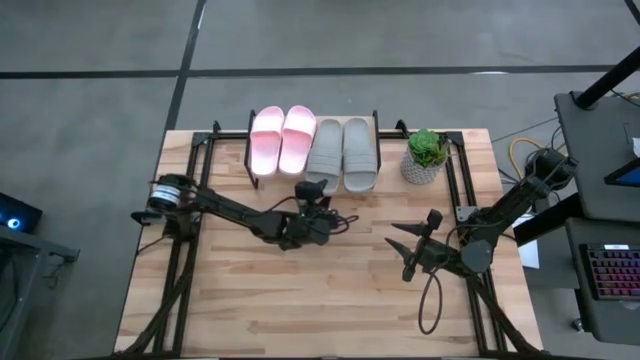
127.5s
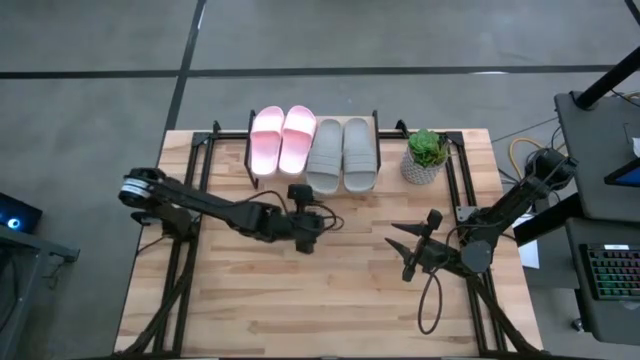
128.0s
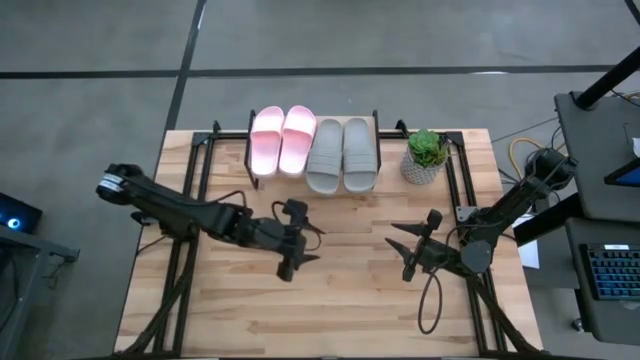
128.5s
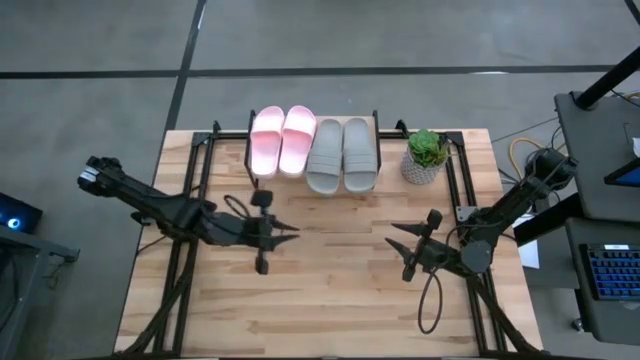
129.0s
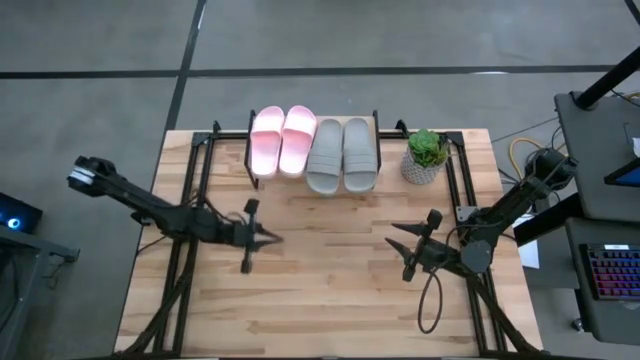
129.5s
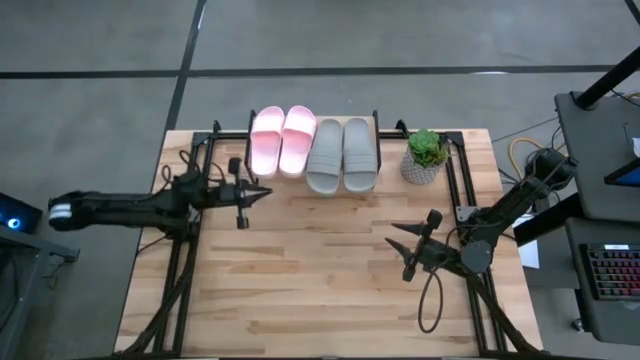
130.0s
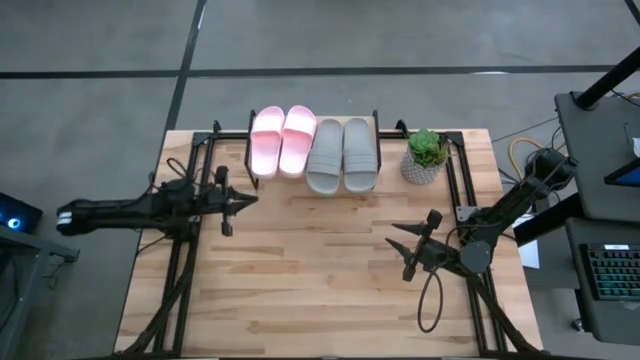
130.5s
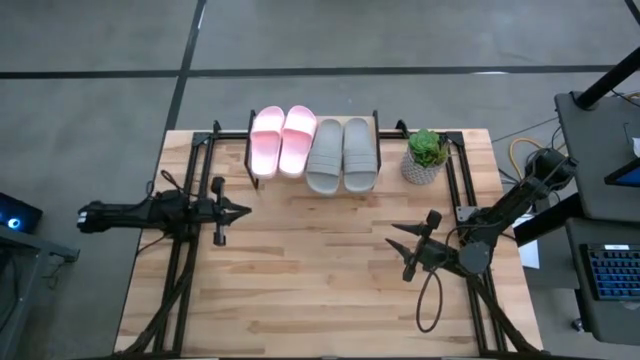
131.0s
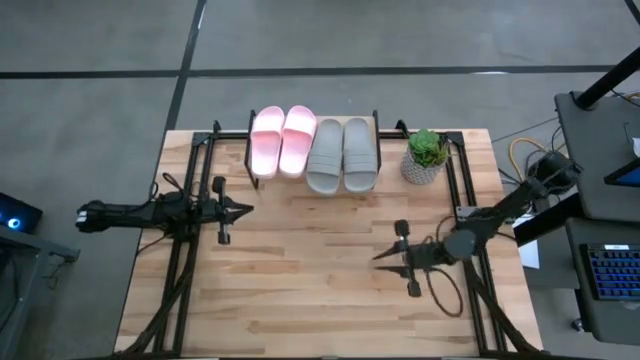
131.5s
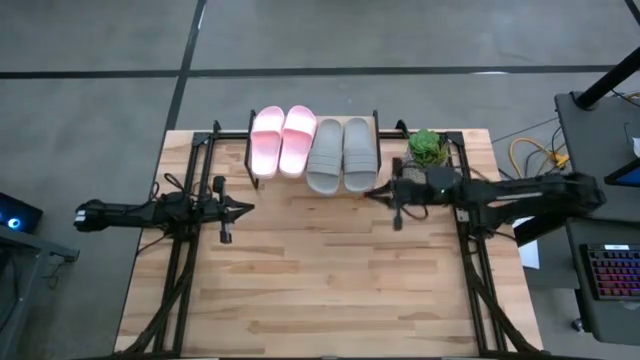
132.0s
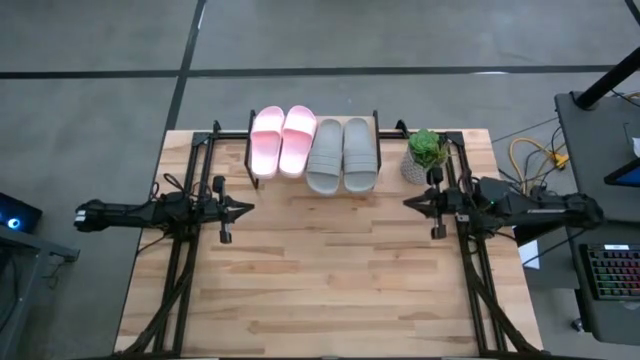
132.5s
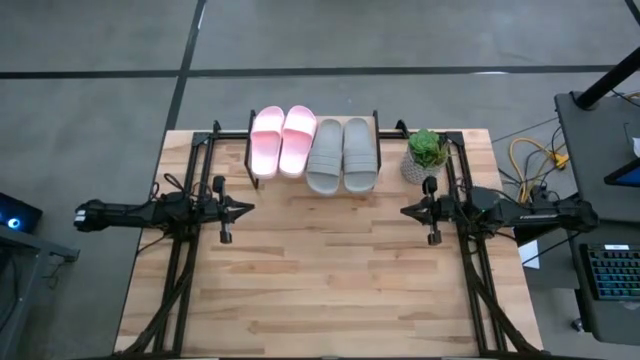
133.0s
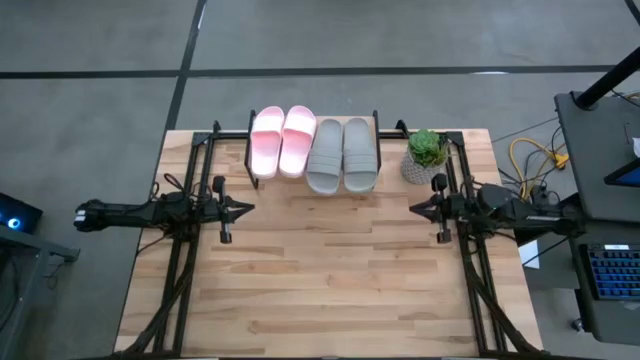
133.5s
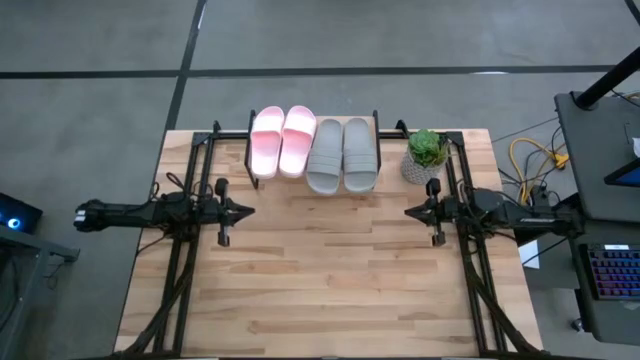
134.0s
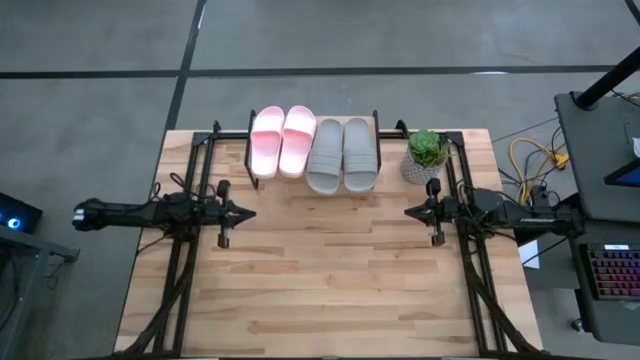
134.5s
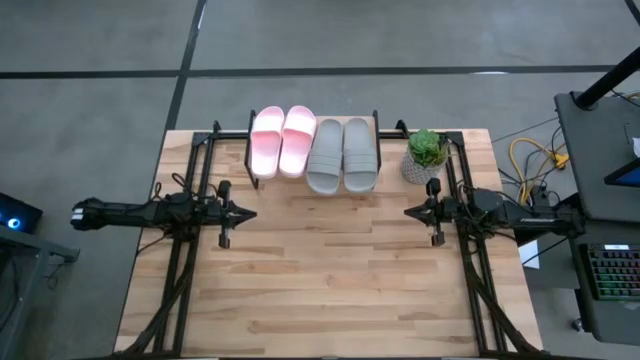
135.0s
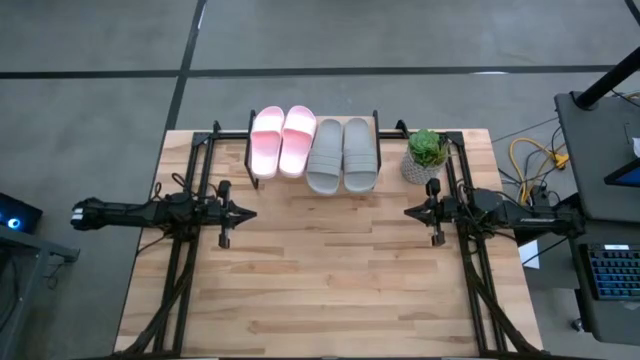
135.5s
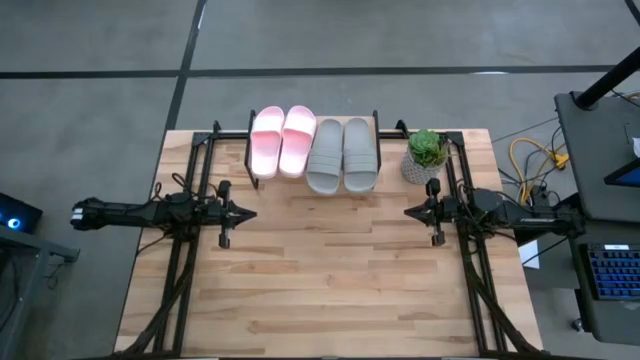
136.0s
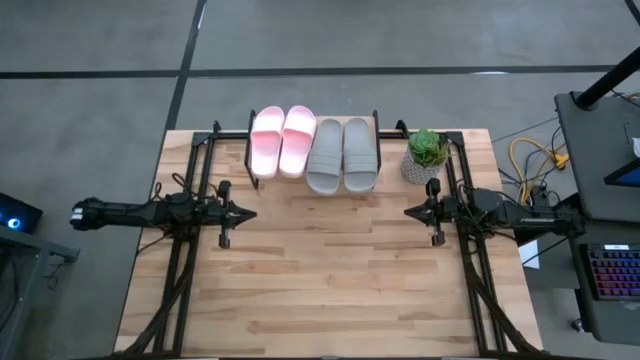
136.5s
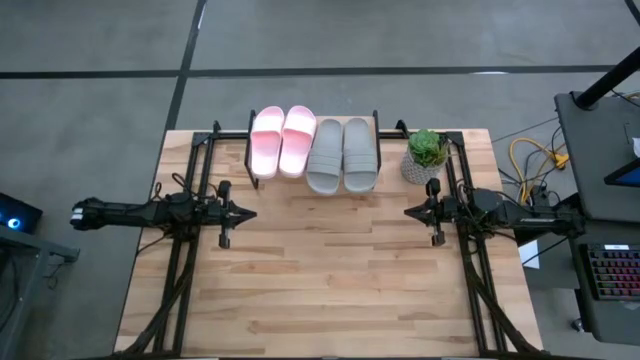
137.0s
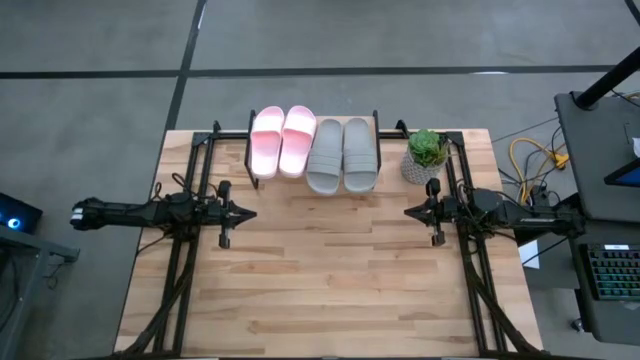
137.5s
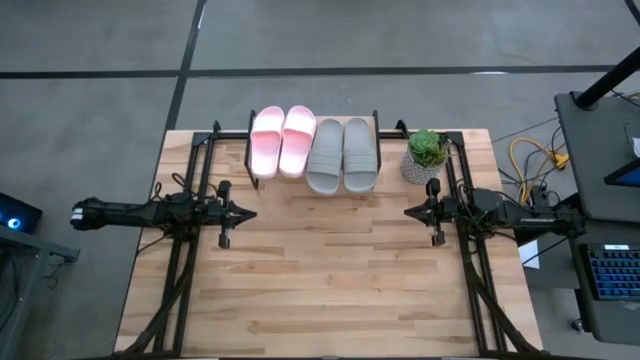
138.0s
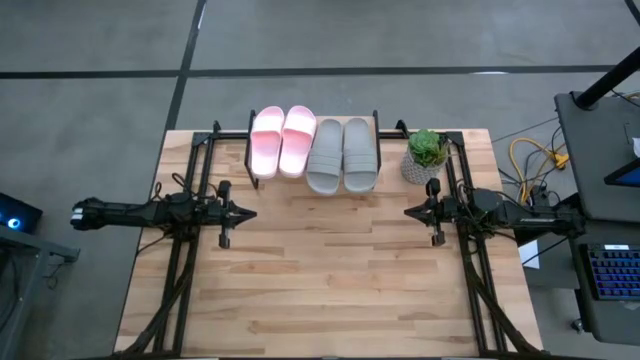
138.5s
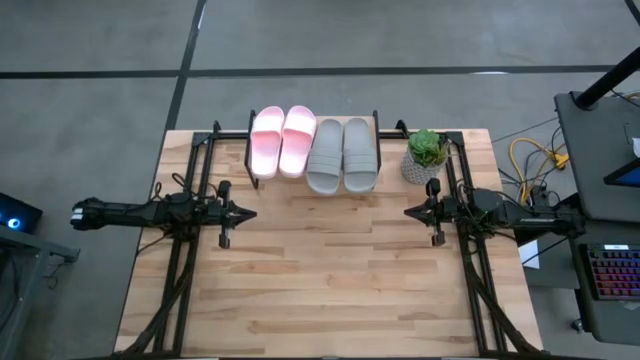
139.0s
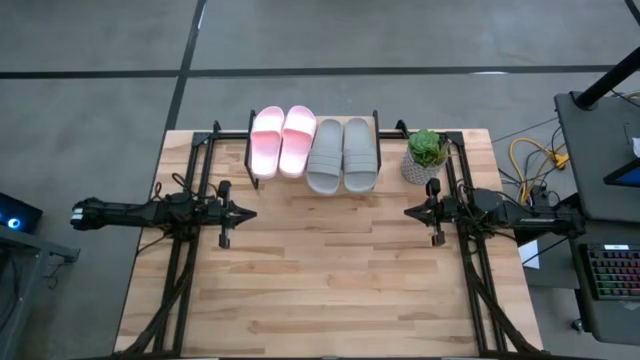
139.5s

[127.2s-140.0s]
Task: Pick and place slides into the shelf
Return to Home Position

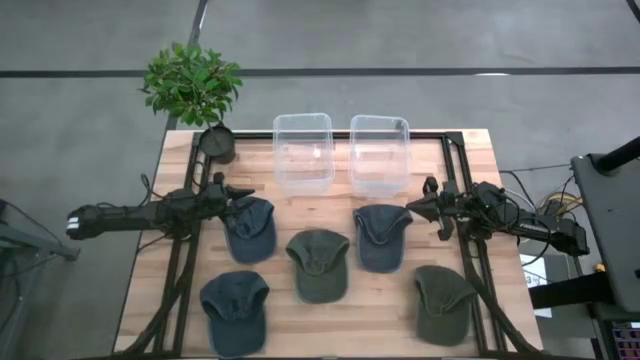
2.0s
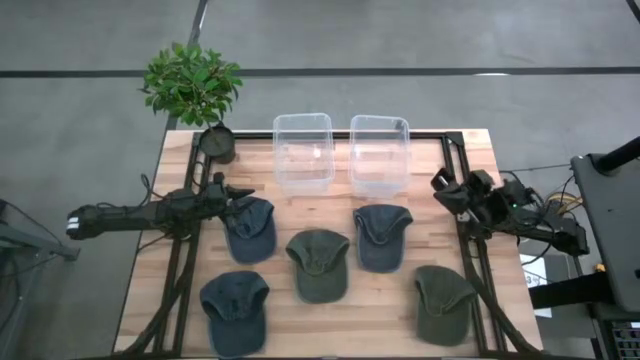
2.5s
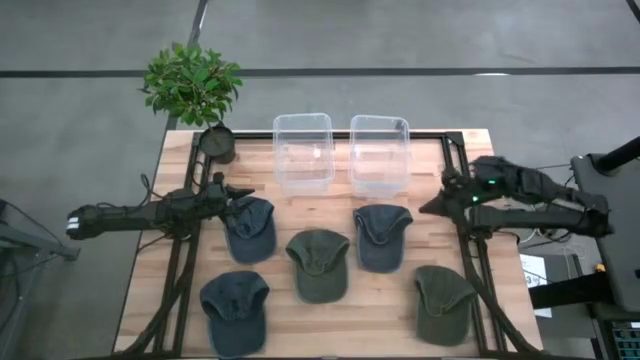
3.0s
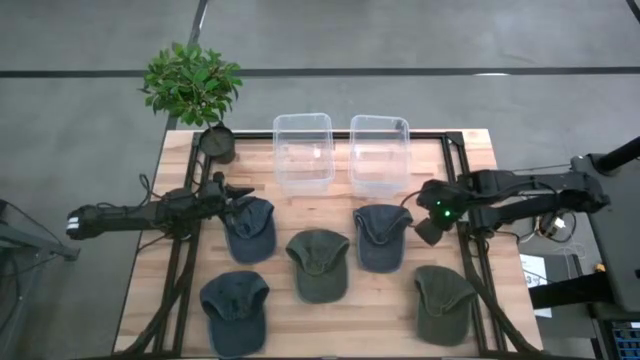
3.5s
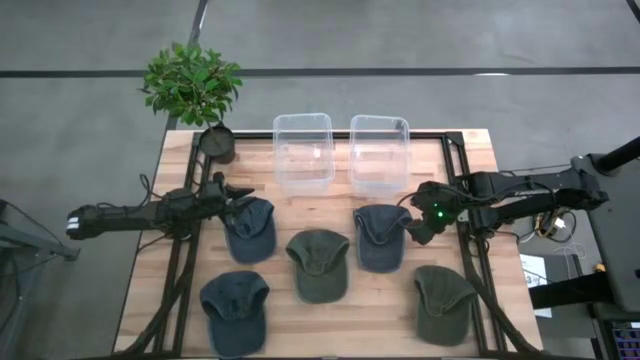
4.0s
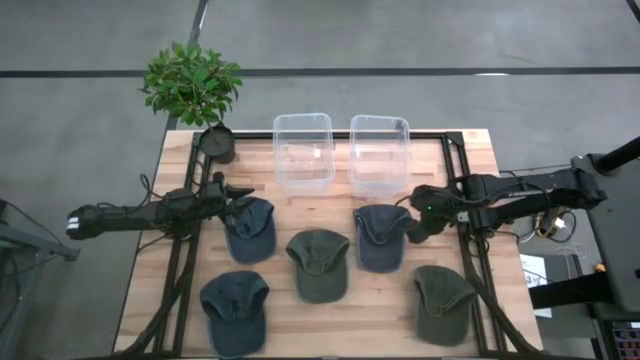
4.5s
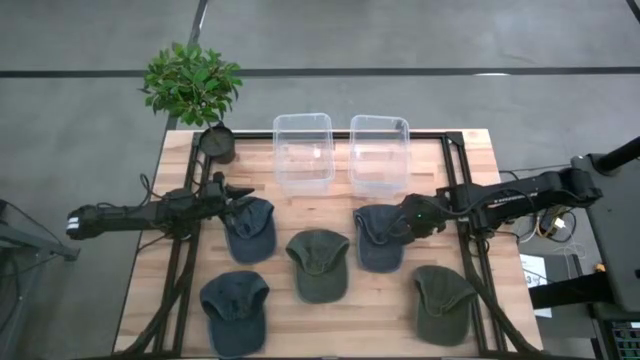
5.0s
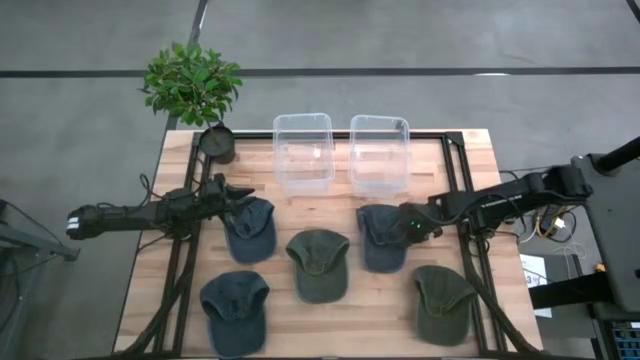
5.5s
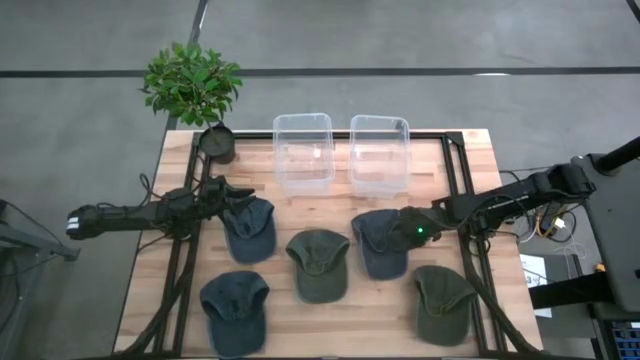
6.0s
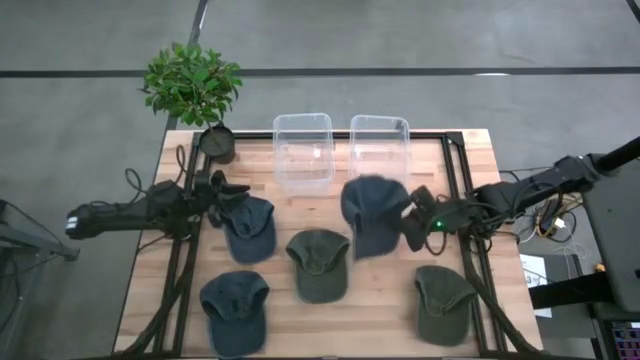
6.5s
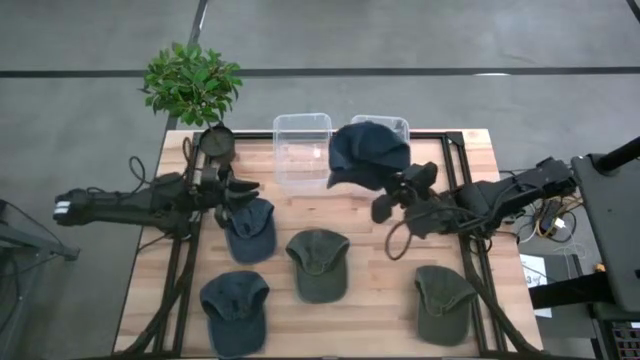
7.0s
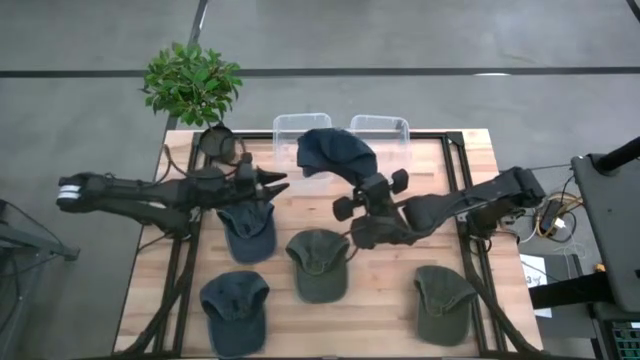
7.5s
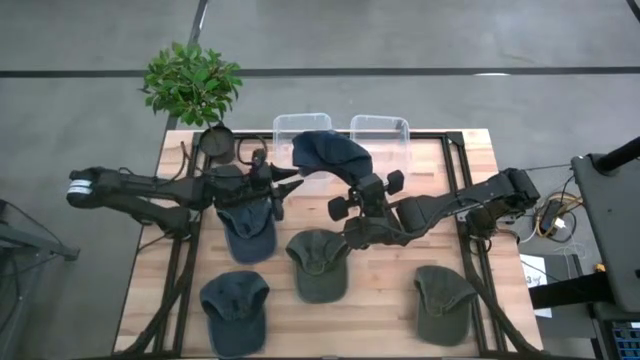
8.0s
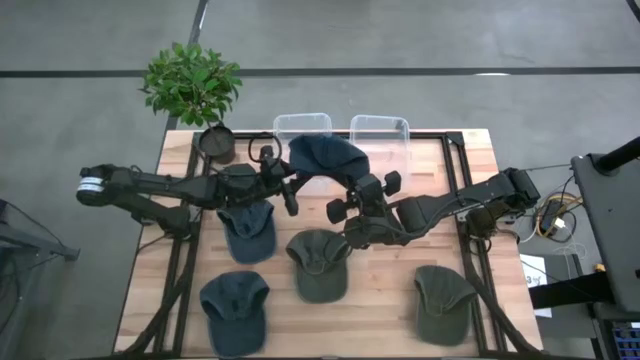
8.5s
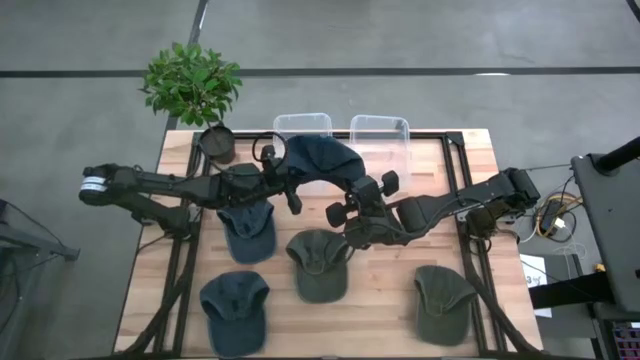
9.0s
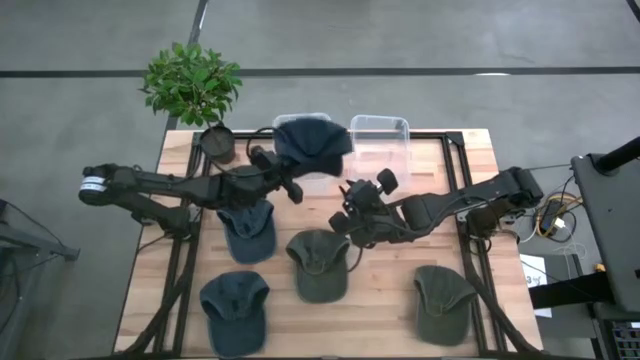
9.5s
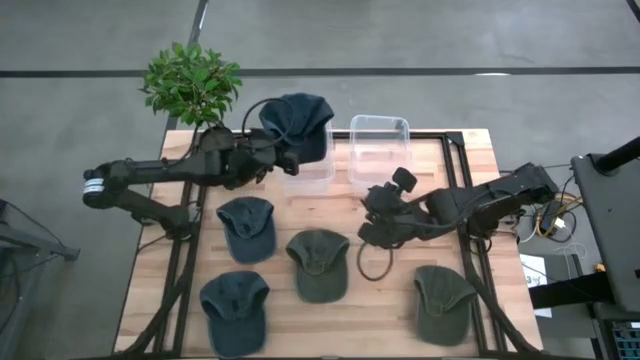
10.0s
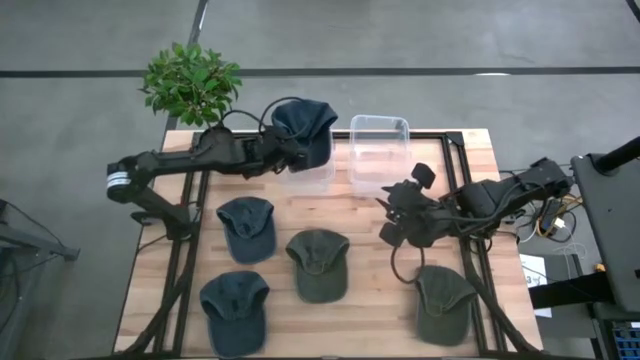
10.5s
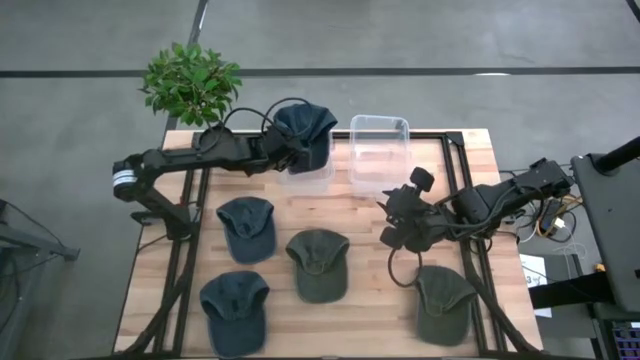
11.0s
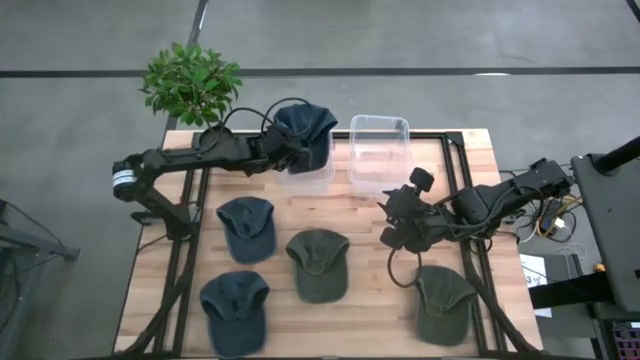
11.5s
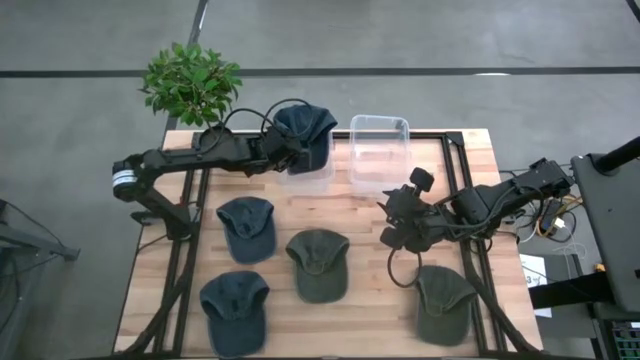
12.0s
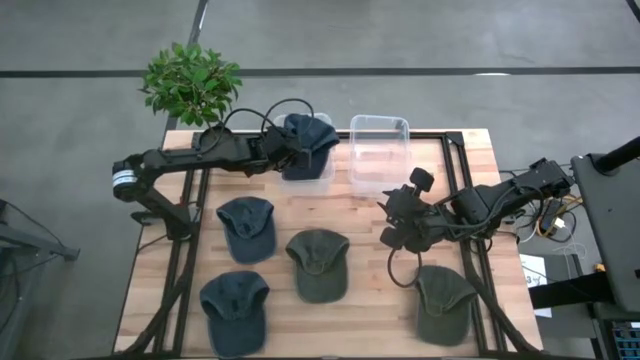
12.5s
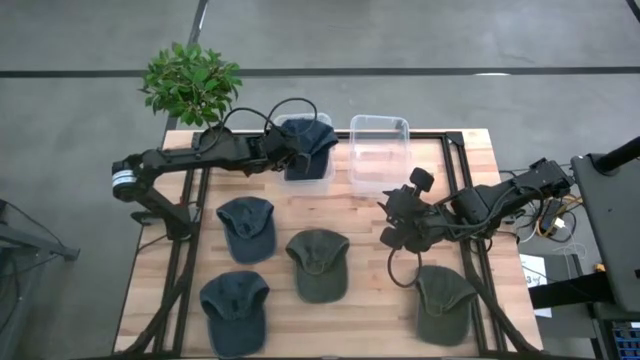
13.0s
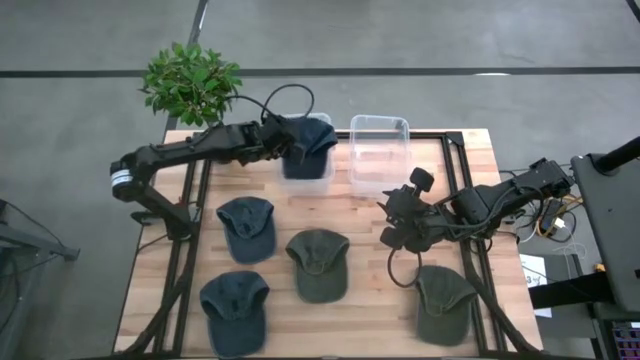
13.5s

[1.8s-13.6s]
Task: Pick & Place hat
Put the top right blue cap into the left transparent bin
